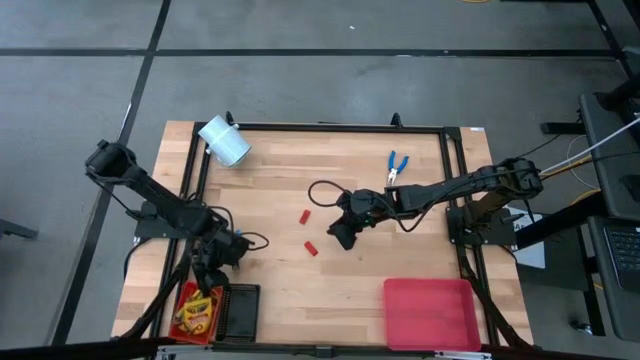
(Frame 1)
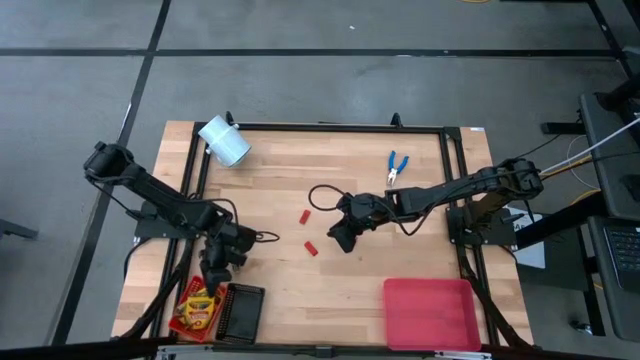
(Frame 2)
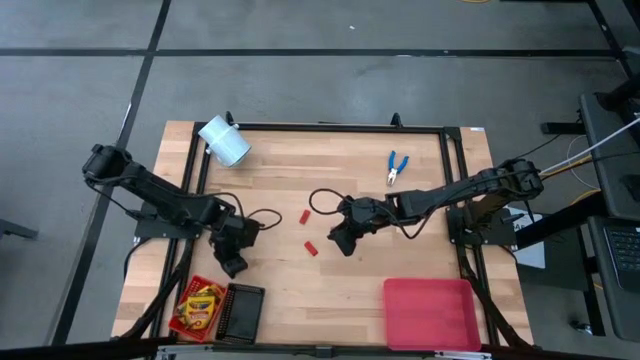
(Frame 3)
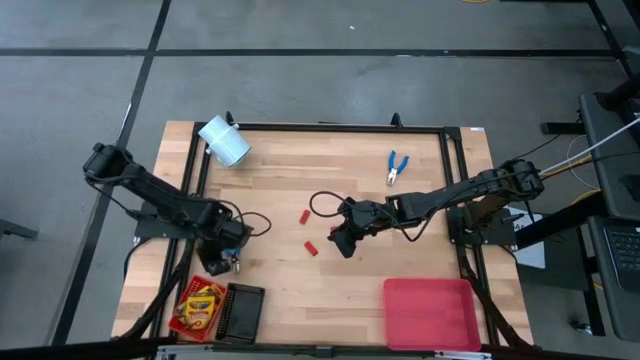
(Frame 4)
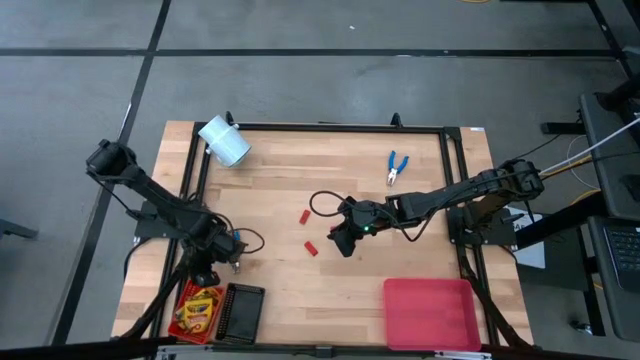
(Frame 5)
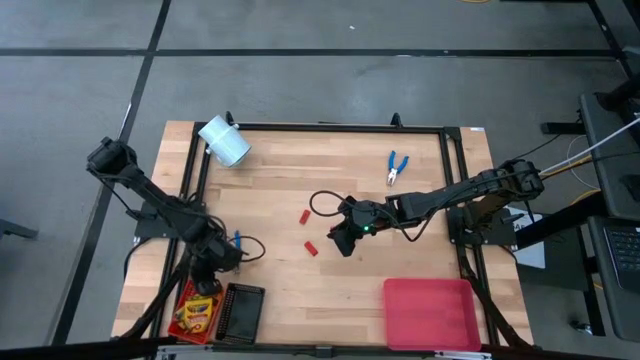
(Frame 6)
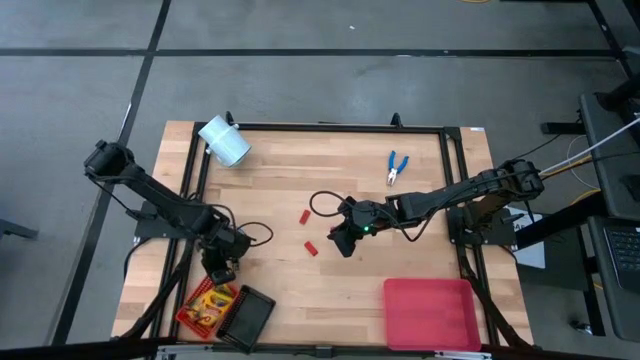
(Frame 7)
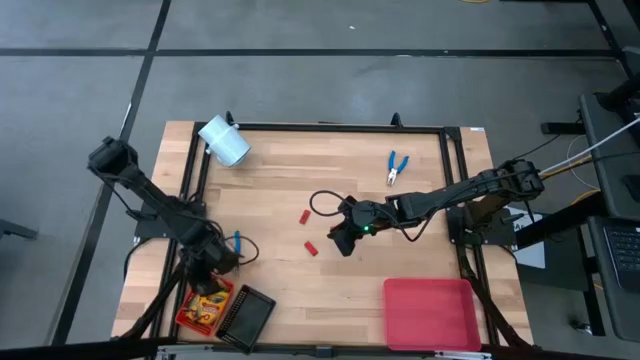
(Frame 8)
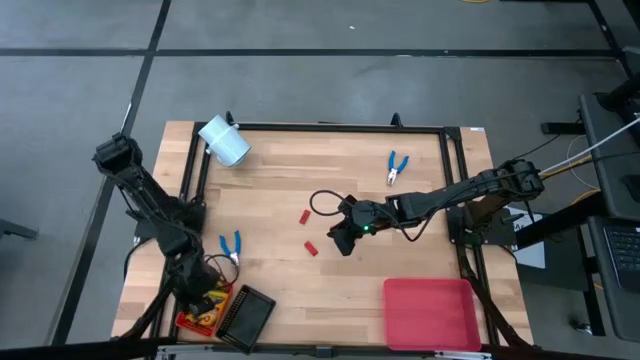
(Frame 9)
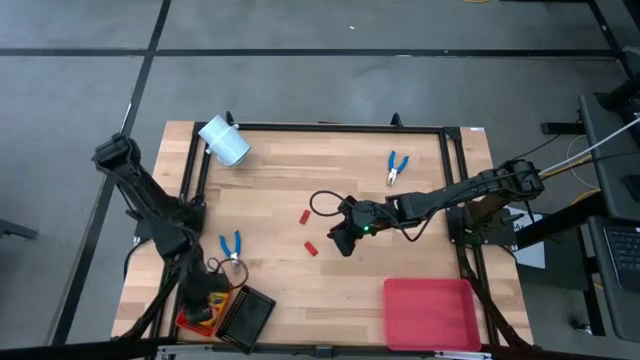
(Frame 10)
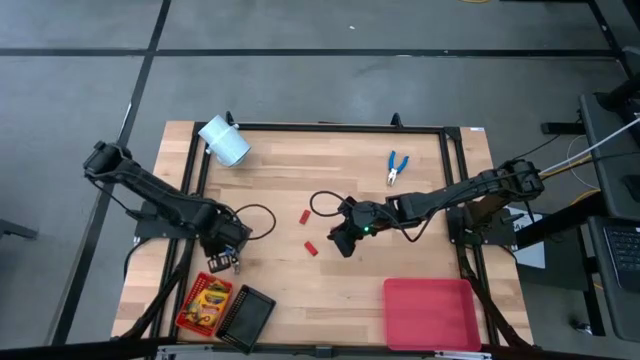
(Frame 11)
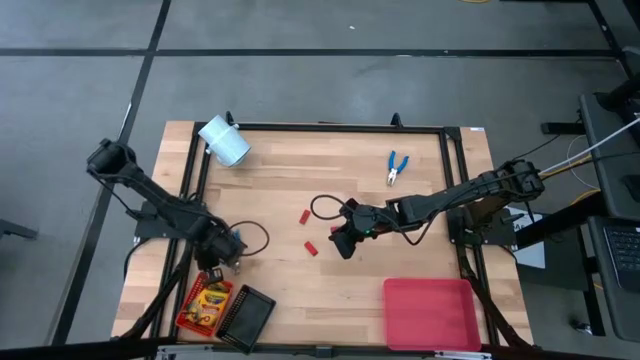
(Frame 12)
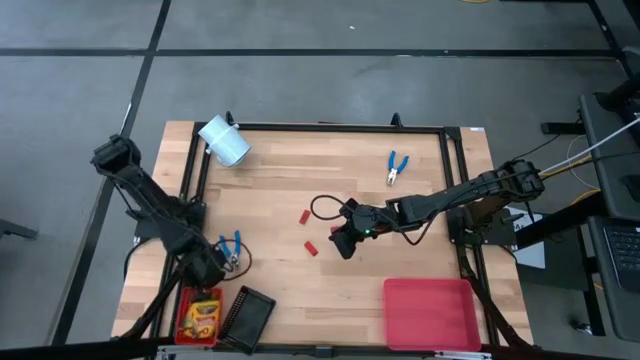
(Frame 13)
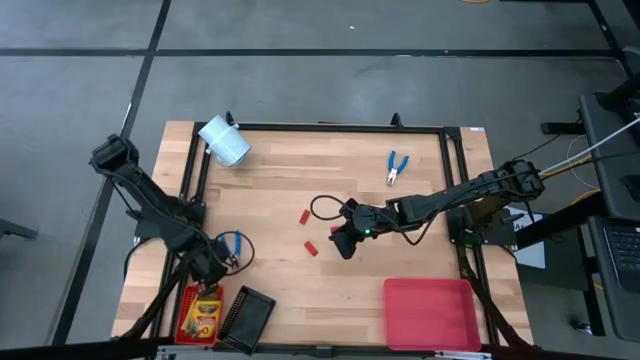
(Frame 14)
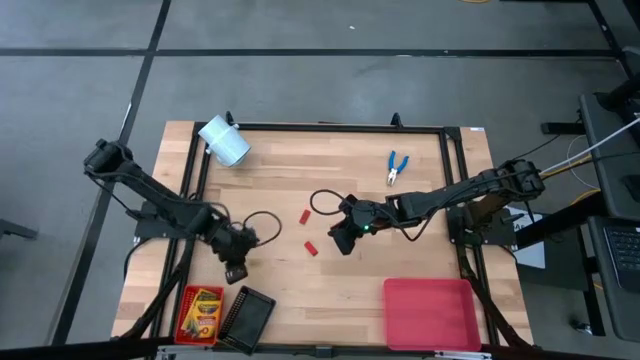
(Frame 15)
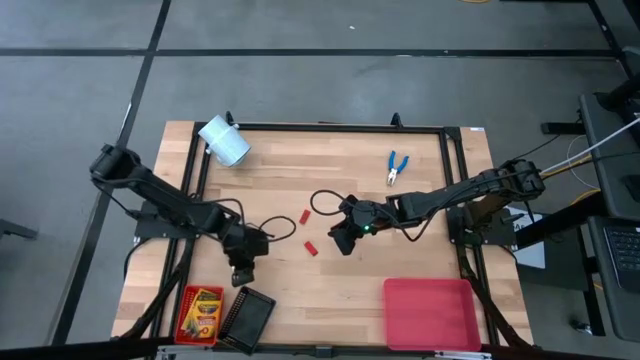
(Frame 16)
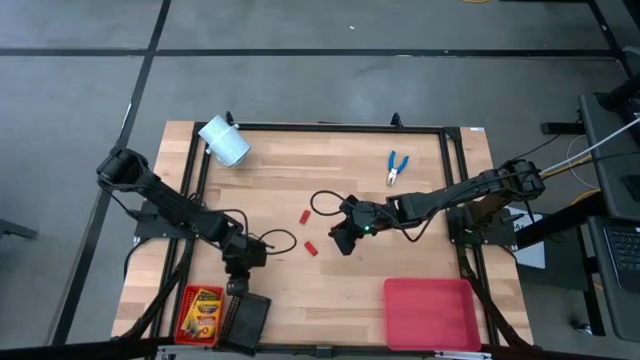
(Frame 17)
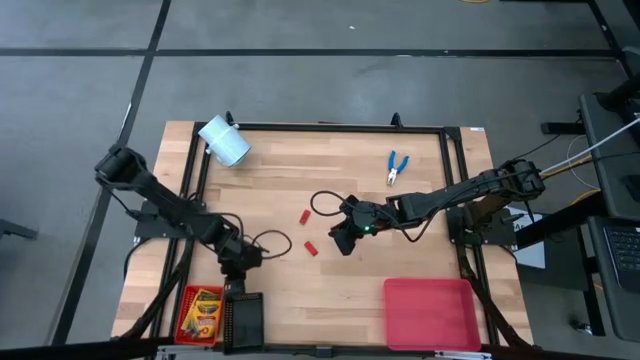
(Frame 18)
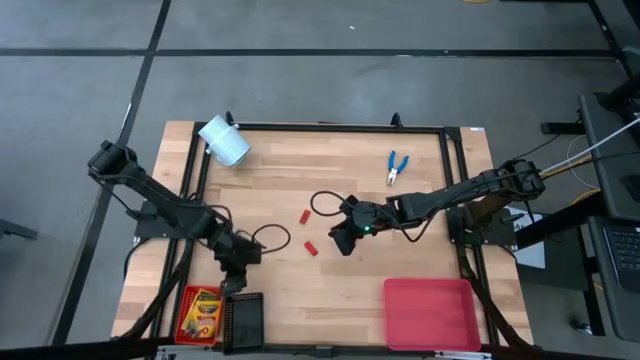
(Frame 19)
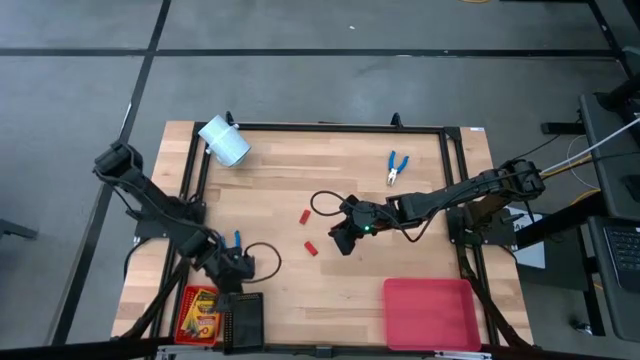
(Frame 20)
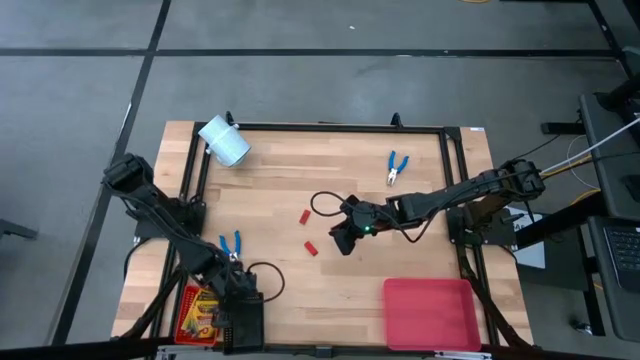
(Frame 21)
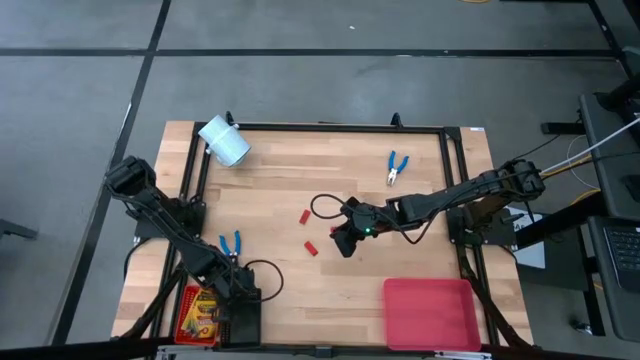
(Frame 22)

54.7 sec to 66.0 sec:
Task: Pick & Place School Supplies
Adjust the baskets on the table

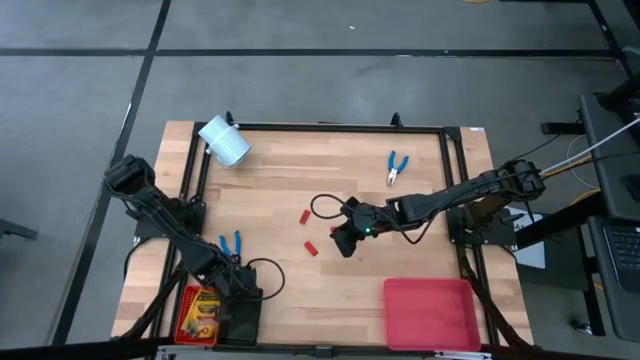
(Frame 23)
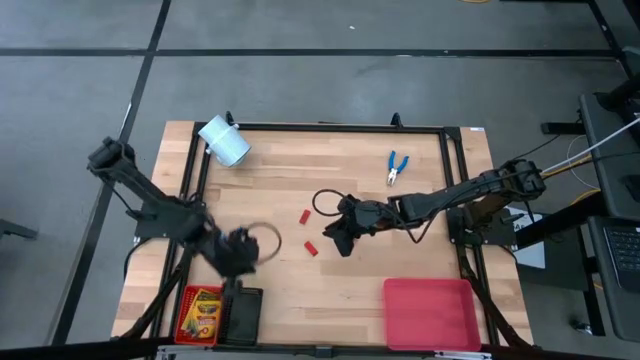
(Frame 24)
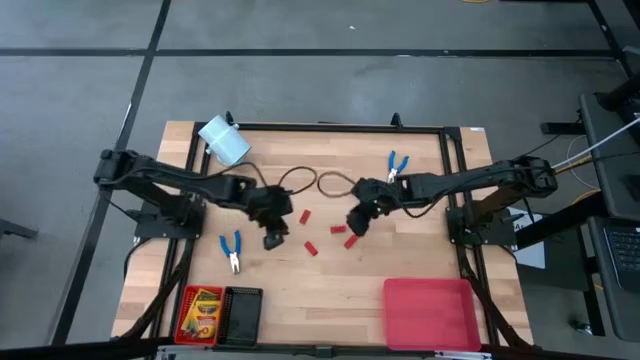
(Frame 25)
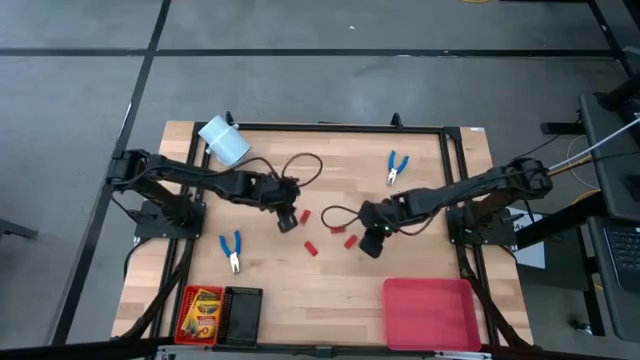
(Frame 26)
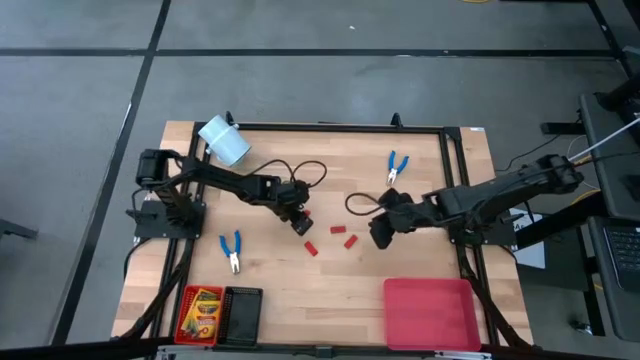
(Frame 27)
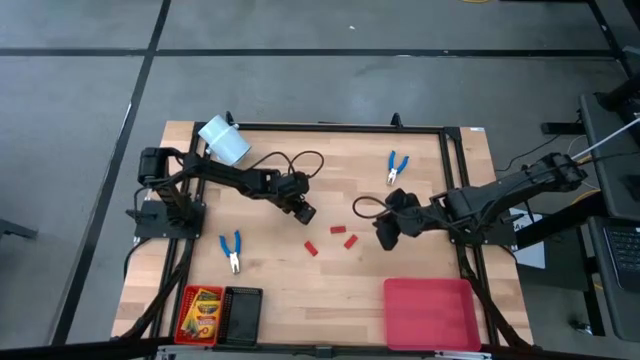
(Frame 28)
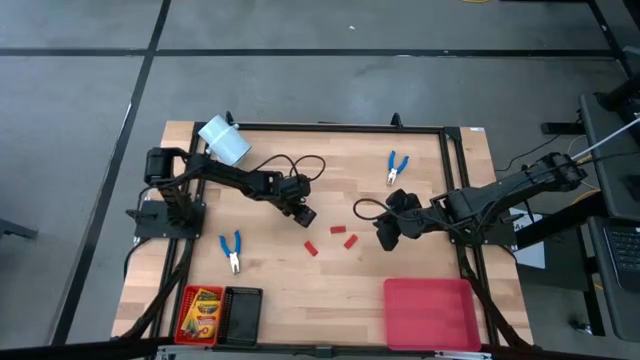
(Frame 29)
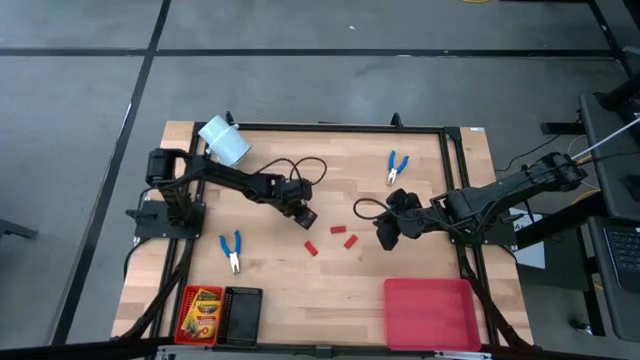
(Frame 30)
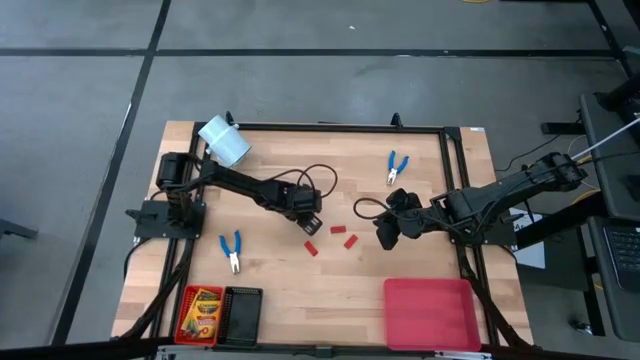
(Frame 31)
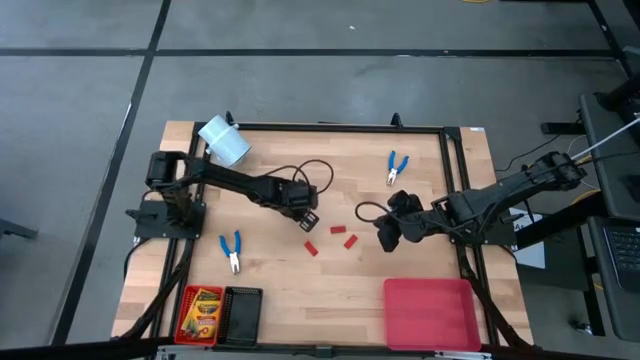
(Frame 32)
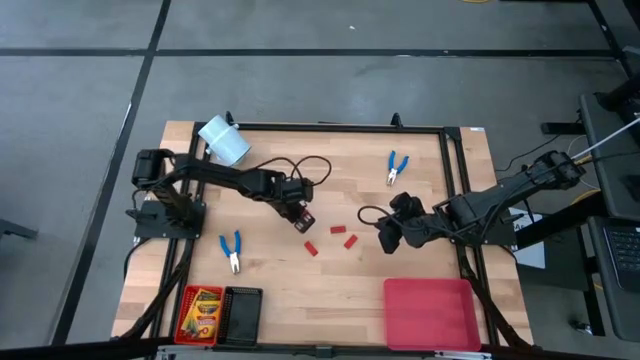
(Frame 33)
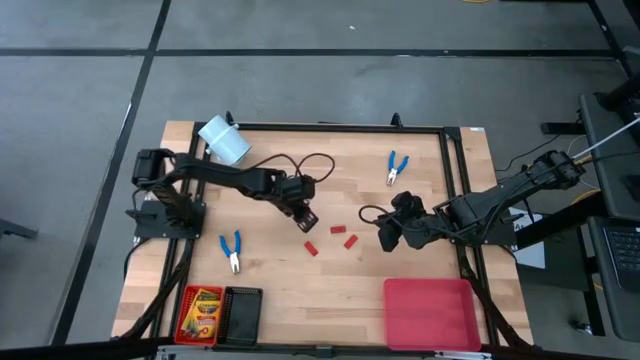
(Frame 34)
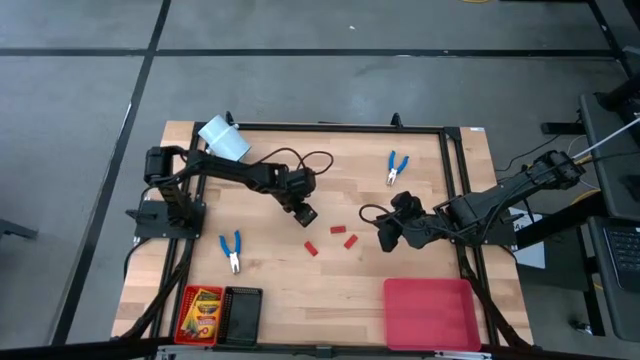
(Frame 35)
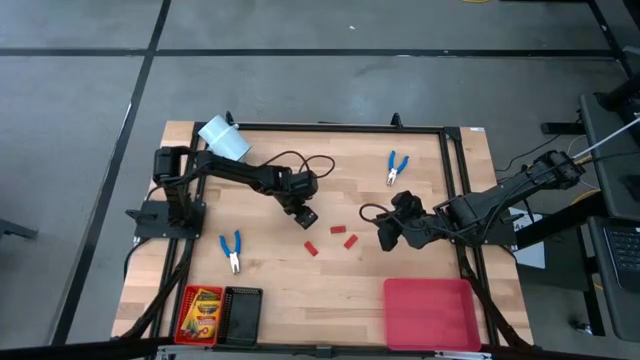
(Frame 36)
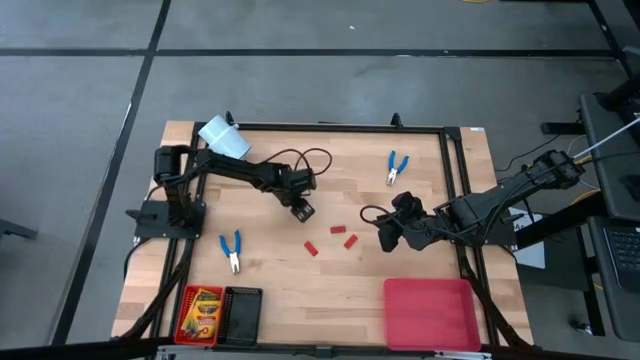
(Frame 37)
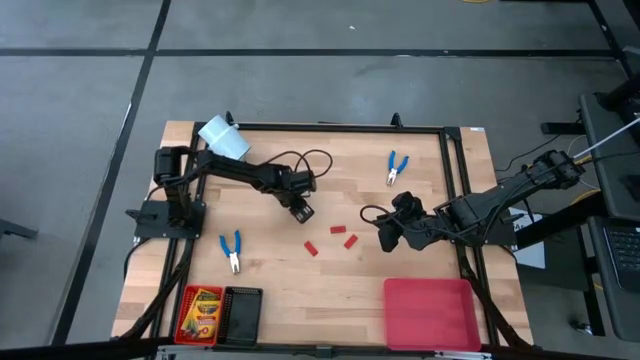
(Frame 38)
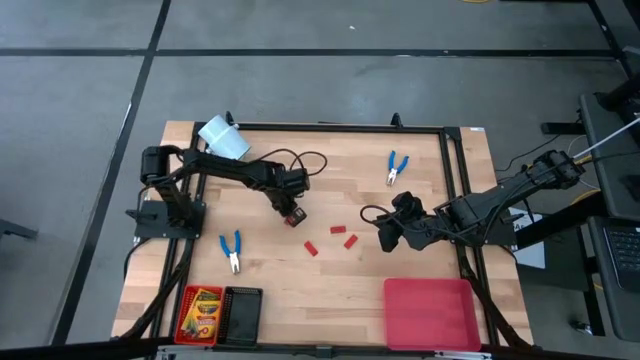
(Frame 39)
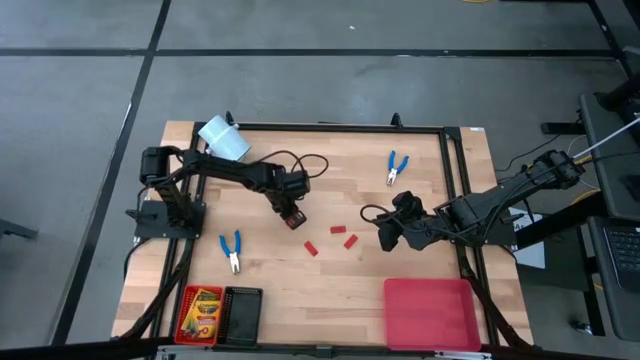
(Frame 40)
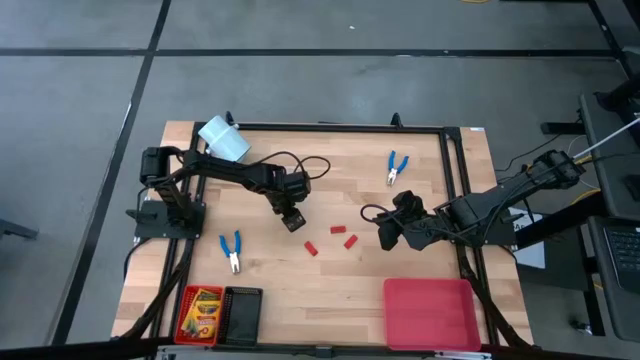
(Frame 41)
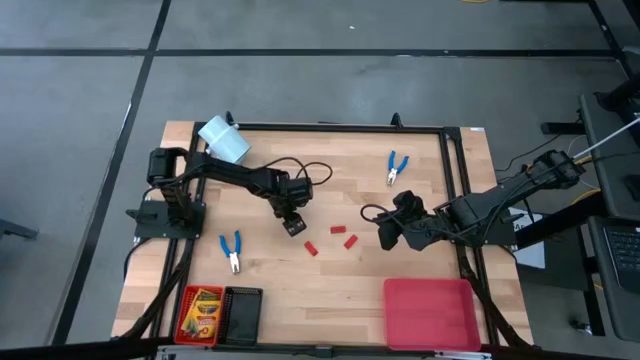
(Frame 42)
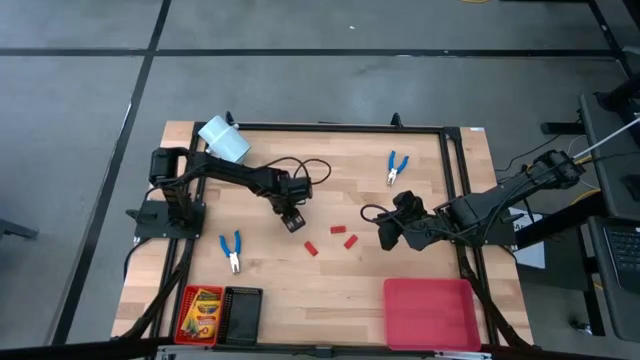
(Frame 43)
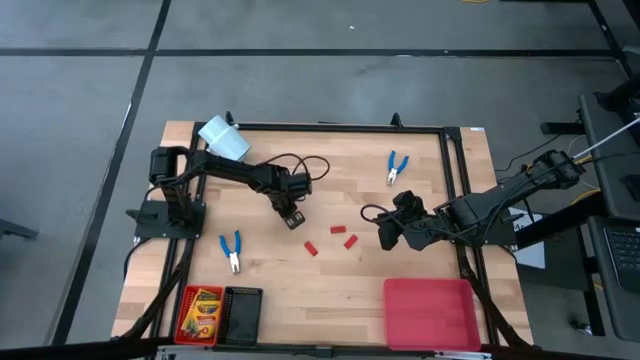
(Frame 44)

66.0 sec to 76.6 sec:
Put the red eraser into the black basket
